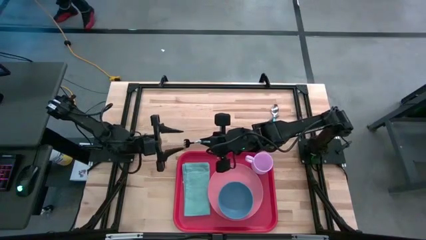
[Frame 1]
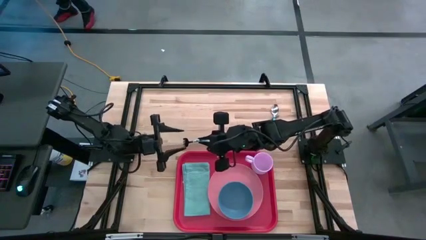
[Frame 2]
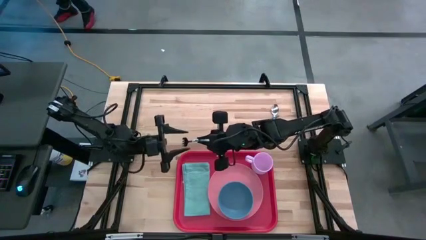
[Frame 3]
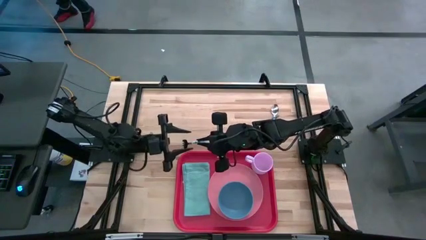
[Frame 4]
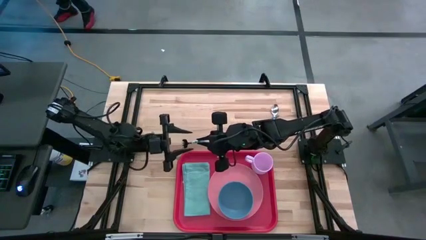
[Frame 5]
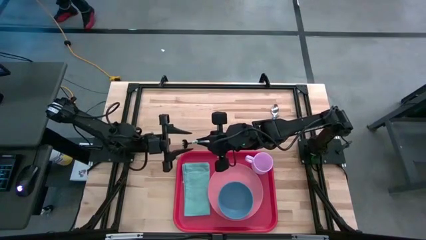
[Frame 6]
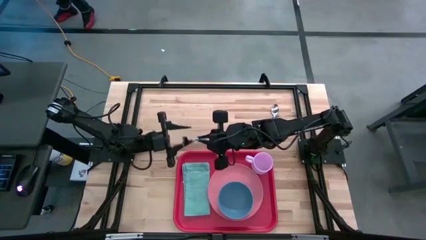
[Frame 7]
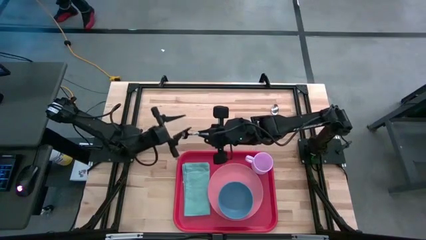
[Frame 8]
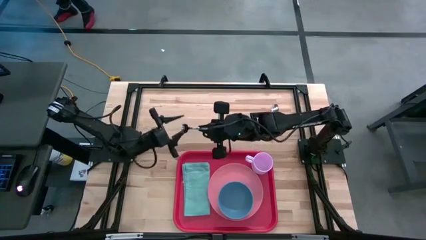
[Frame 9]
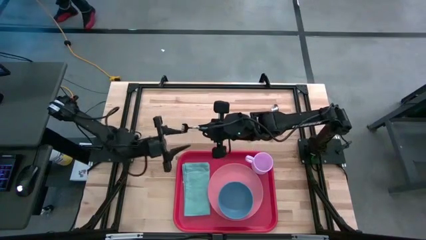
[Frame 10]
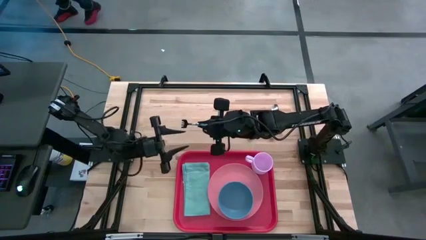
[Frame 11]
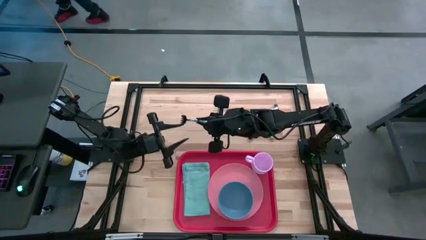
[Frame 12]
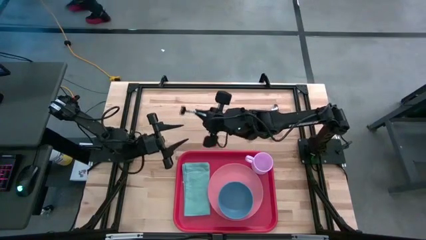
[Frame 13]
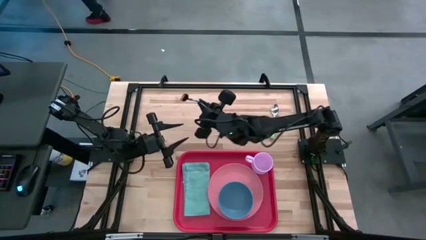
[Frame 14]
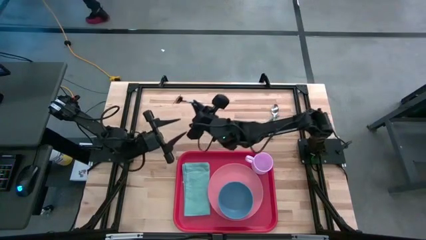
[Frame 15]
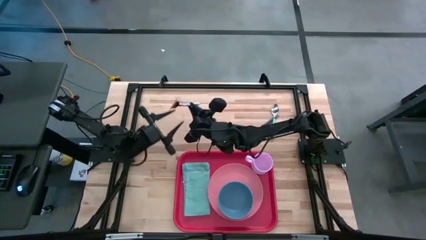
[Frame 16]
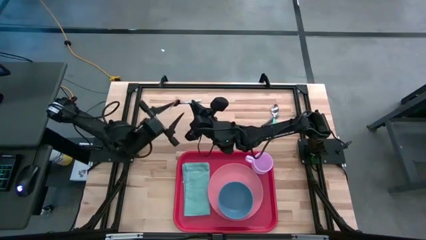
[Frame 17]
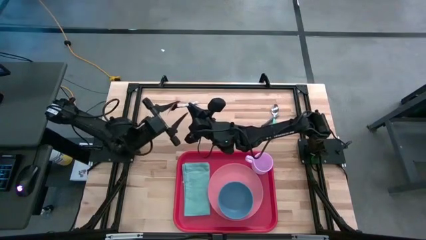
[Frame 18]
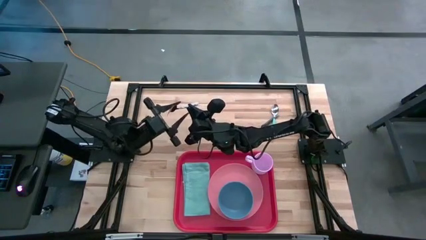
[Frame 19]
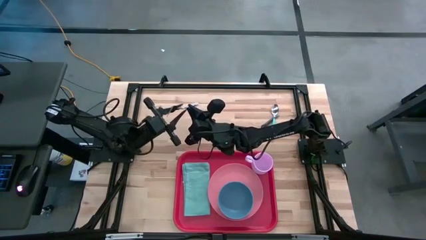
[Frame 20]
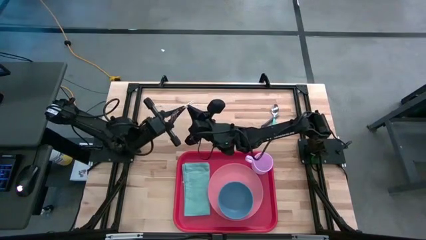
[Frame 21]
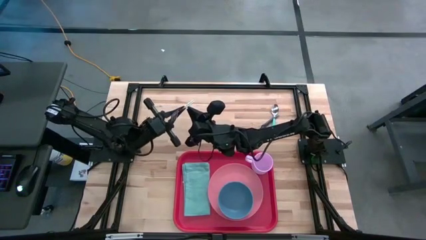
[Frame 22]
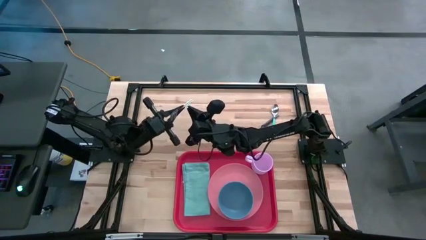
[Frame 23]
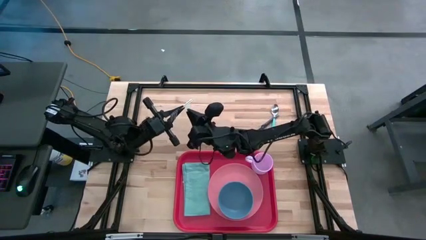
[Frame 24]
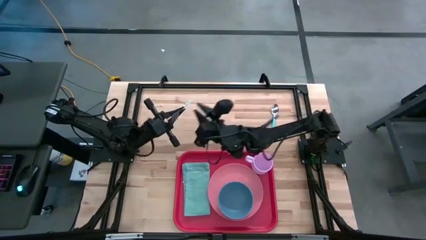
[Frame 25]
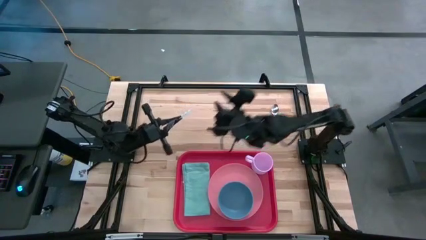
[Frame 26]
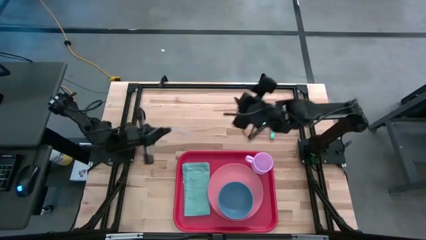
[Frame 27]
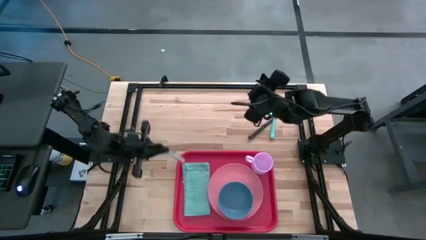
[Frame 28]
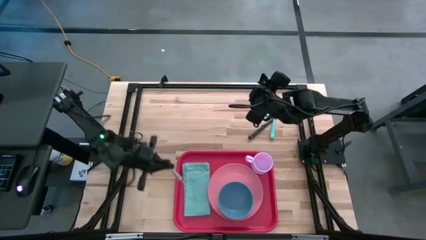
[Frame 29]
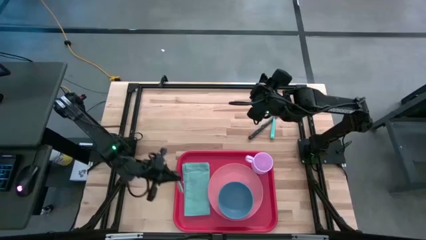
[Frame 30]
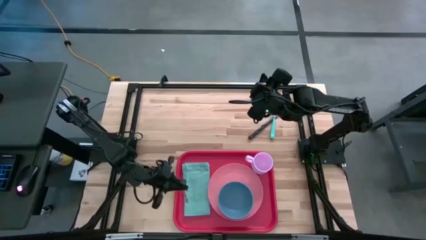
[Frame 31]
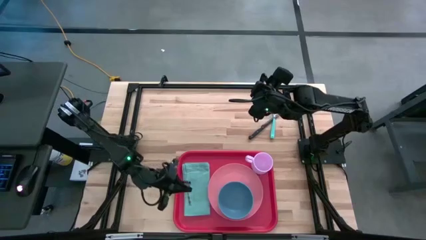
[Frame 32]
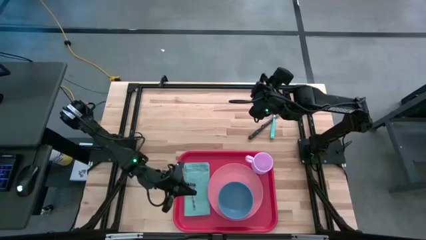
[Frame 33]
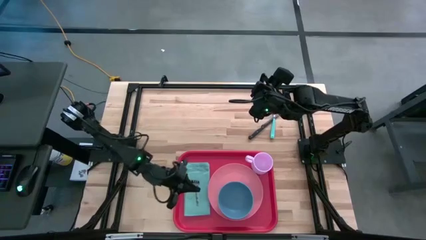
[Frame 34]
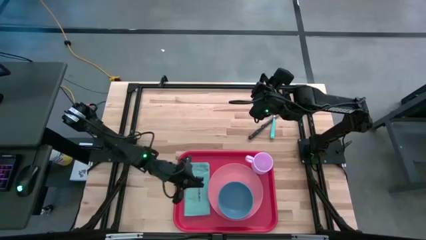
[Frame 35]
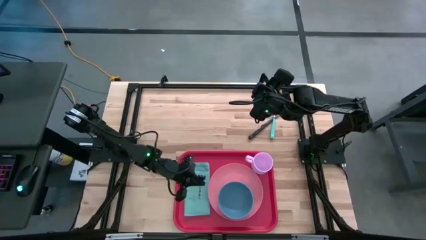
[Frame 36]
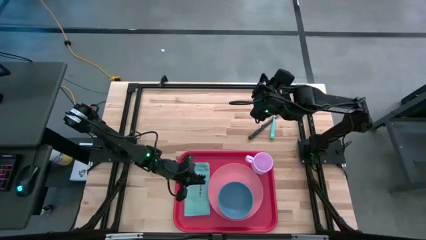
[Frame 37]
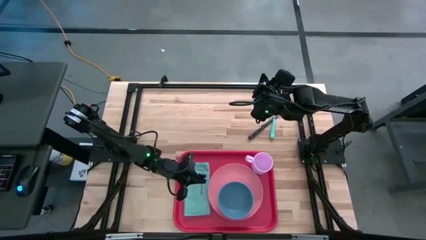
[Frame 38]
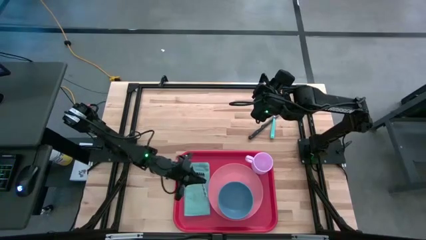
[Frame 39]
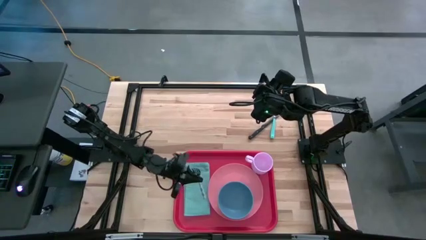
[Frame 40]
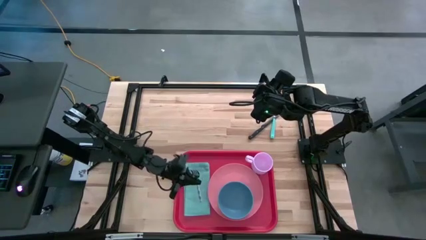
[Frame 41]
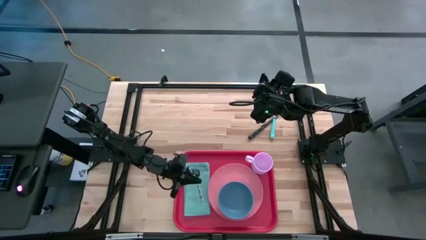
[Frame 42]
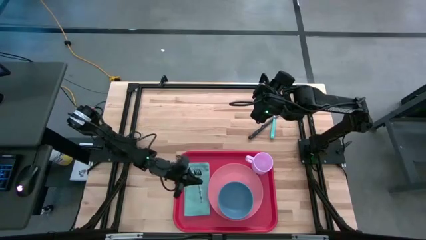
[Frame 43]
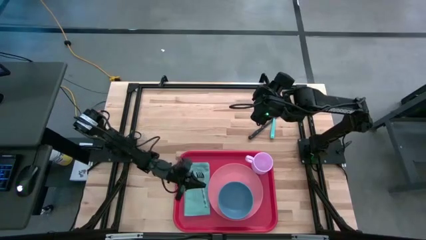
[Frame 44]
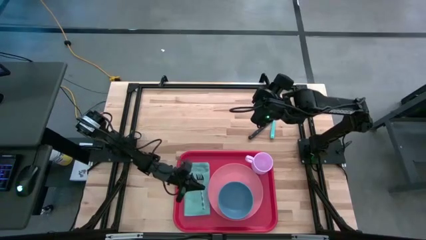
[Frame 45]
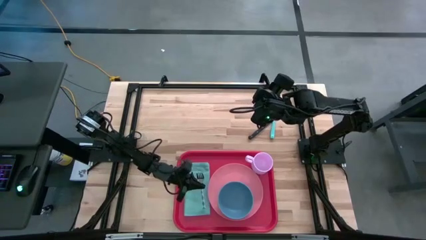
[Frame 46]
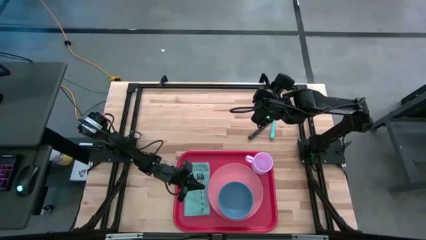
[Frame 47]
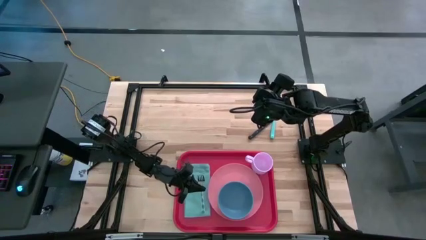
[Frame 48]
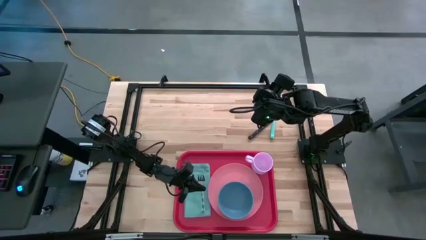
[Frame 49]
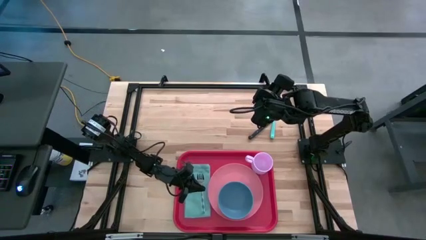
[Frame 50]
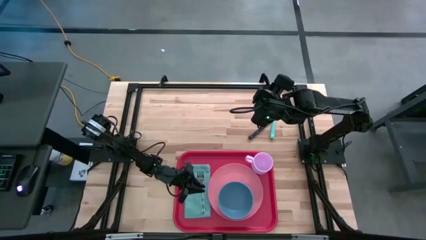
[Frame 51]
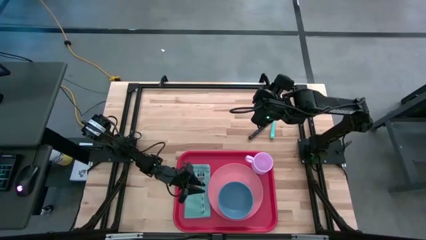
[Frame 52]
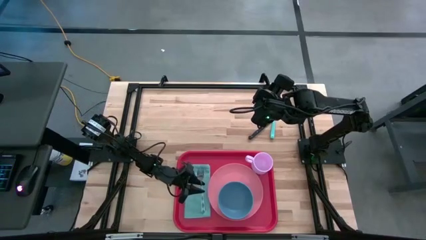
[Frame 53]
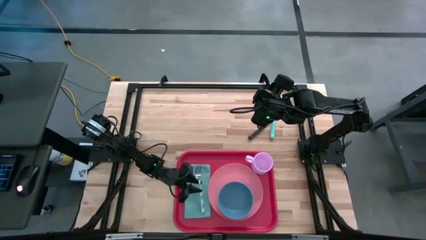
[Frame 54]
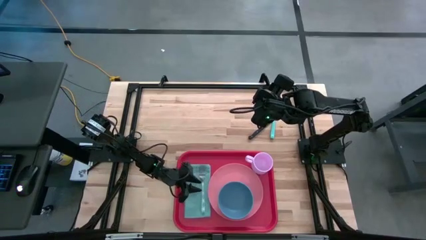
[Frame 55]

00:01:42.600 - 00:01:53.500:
Task: Set up tray
Put the blue fork on the blue napkin

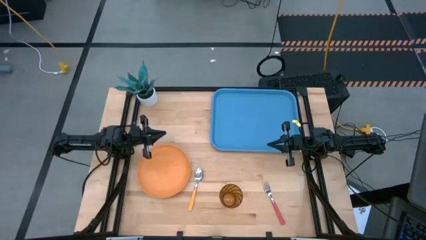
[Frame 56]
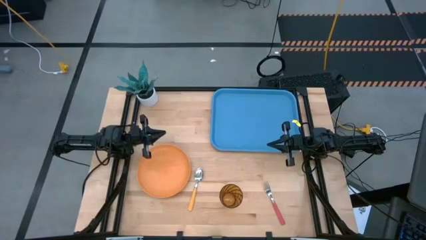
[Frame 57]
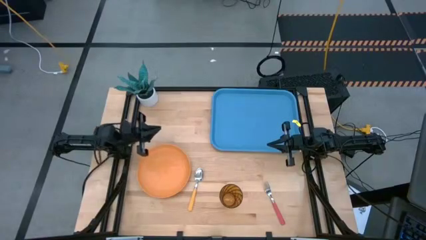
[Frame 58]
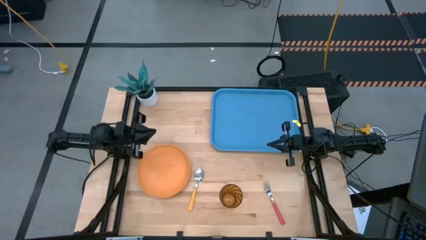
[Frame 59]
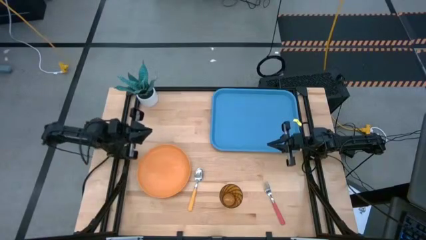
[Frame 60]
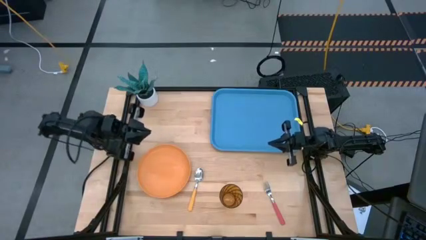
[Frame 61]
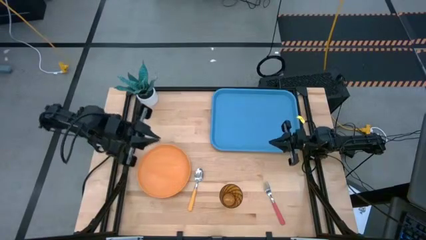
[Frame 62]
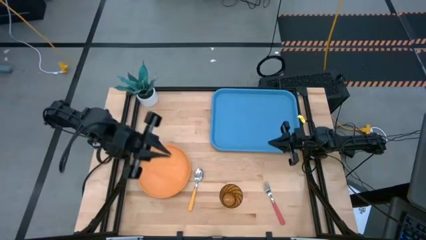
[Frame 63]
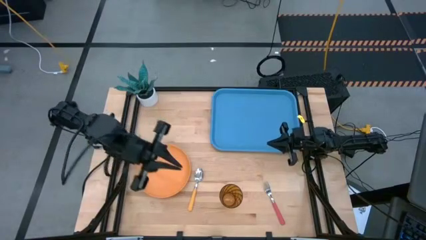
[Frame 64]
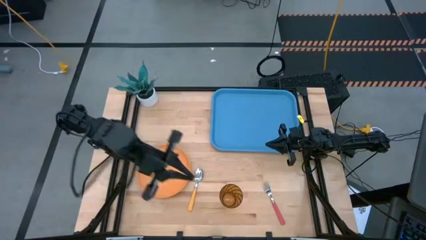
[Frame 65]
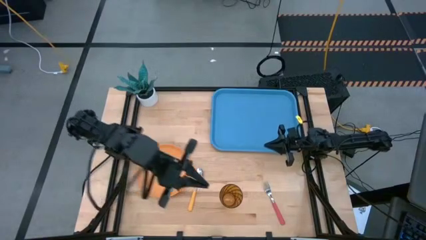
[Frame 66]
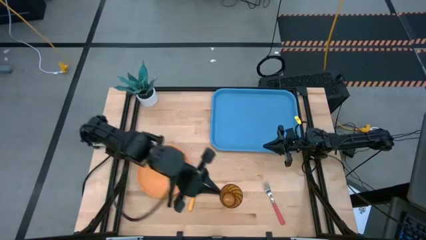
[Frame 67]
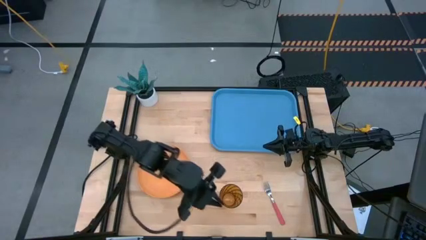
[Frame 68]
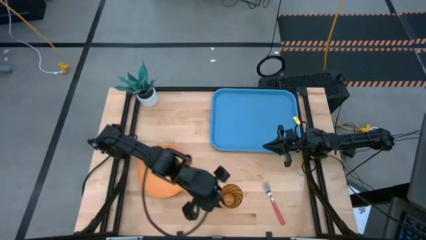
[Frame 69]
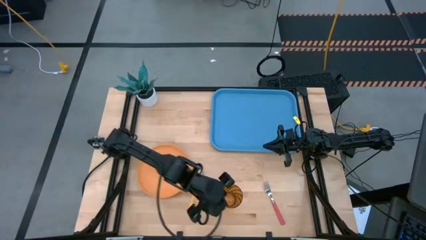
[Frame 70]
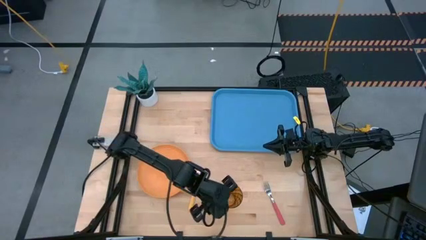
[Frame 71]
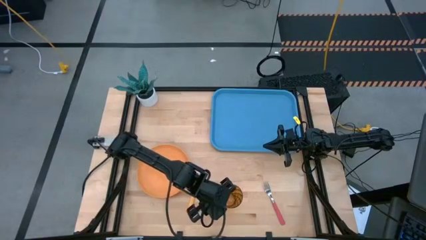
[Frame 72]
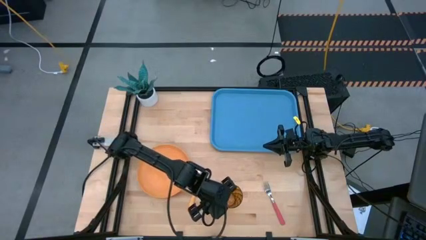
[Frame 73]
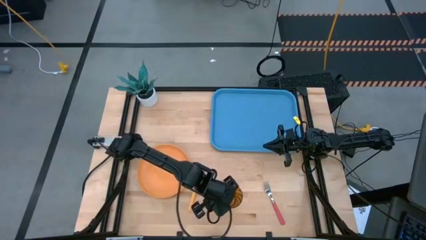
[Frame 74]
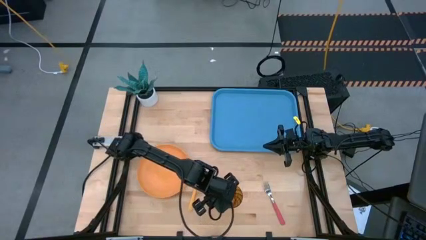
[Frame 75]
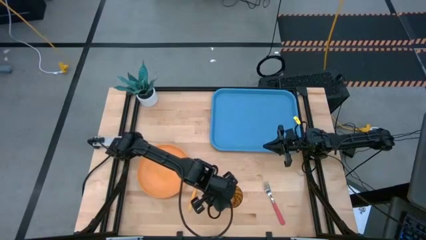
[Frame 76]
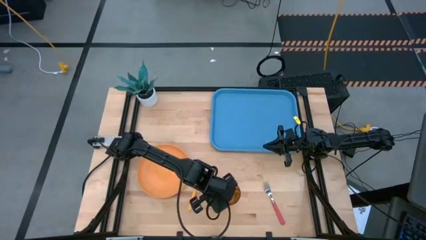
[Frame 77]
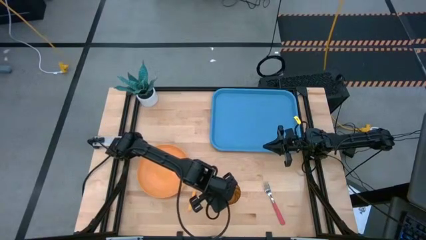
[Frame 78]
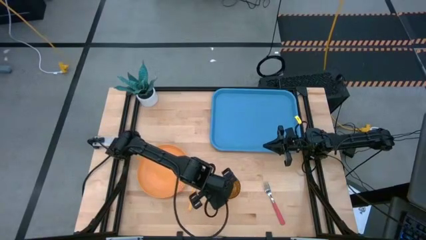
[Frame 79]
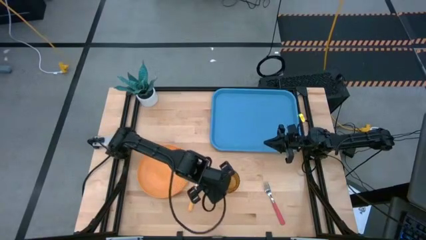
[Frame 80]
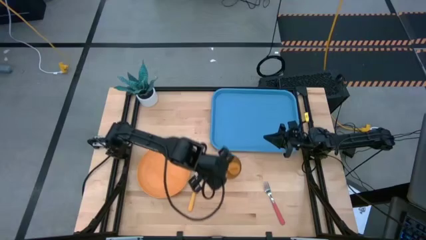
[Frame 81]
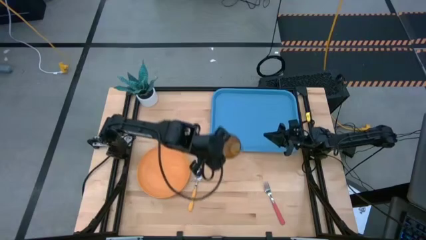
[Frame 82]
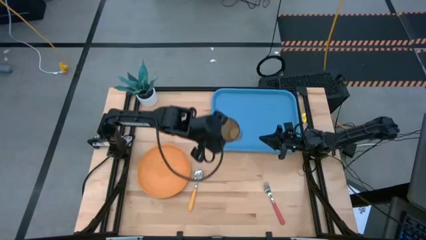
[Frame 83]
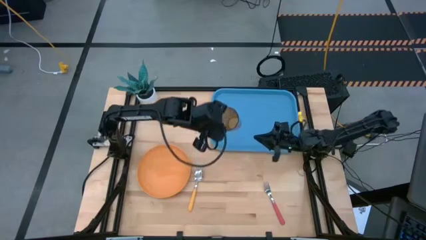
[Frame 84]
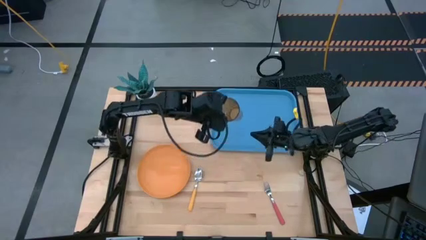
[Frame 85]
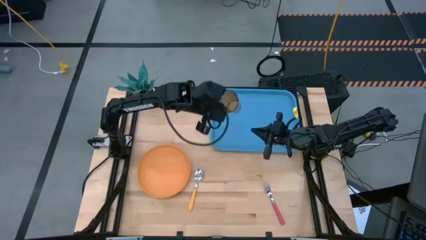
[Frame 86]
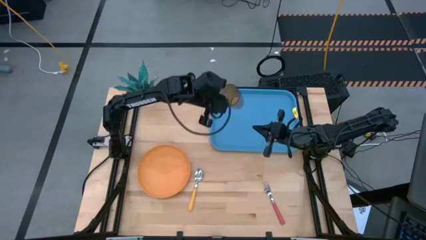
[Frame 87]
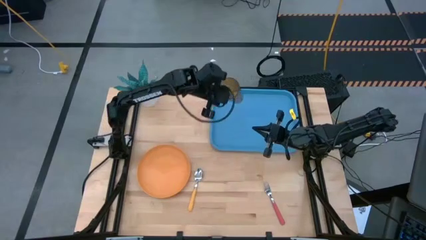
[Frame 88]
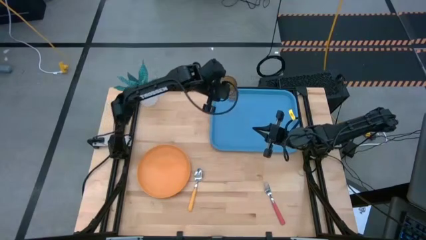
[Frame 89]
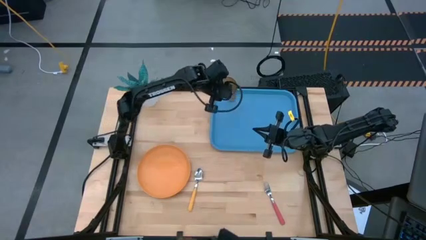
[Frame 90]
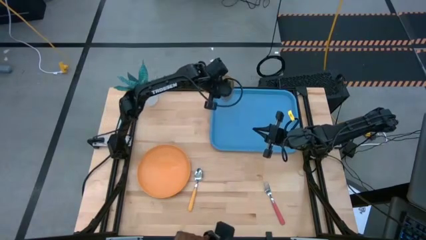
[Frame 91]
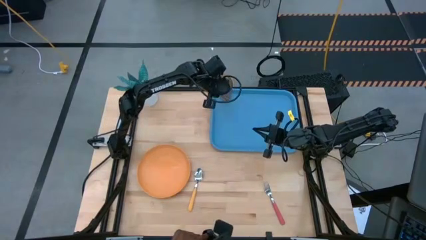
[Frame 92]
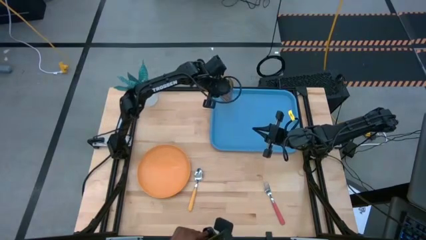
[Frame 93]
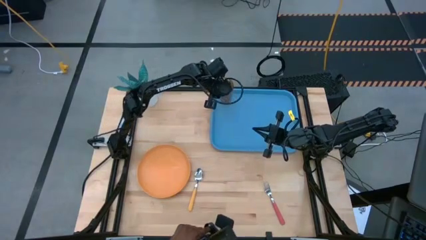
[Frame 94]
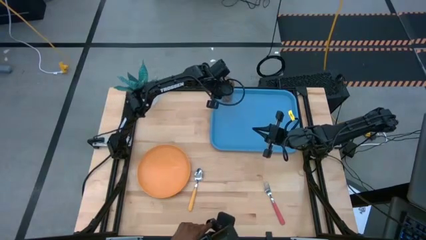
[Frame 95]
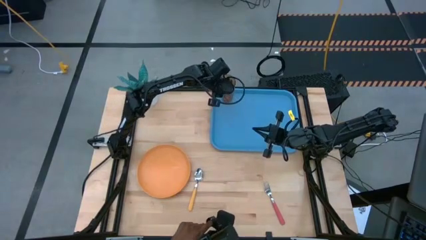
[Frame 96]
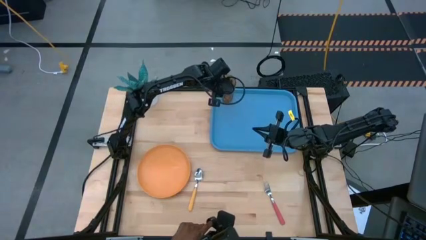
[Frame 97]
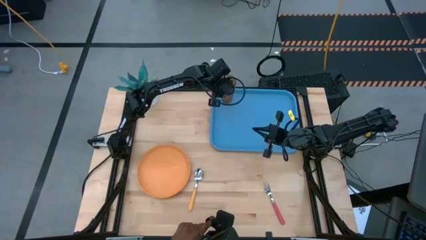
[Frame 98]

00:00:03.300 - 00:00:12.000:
Task: Pick and place plate/cup/fork/spoon on tray
Put the brown cup on the blue serving tray
